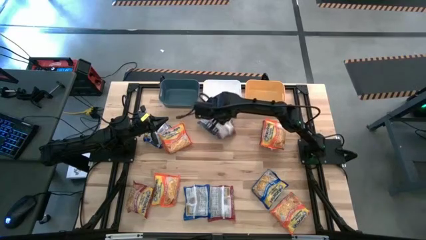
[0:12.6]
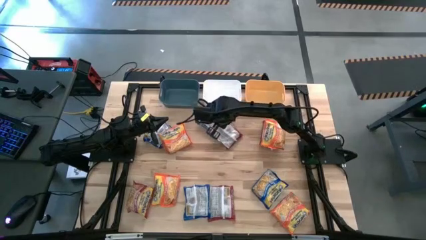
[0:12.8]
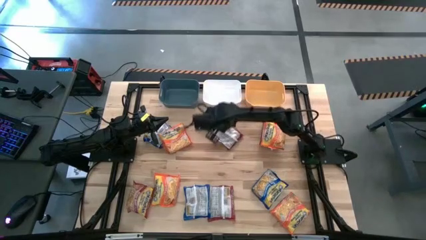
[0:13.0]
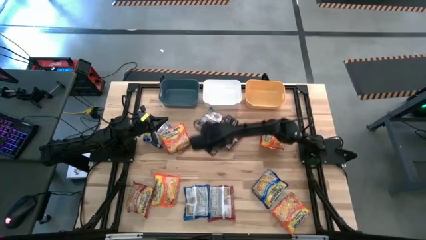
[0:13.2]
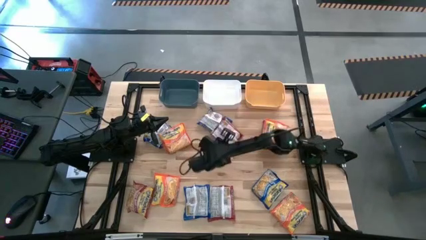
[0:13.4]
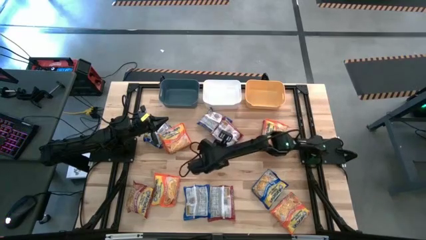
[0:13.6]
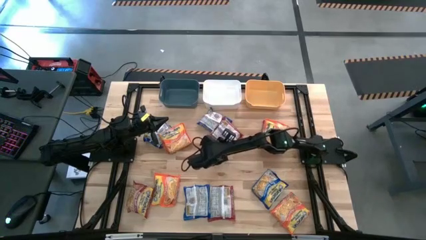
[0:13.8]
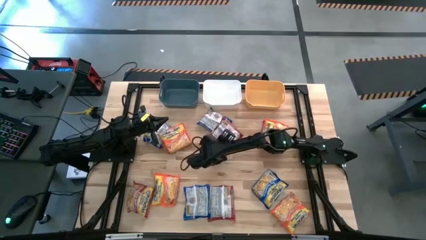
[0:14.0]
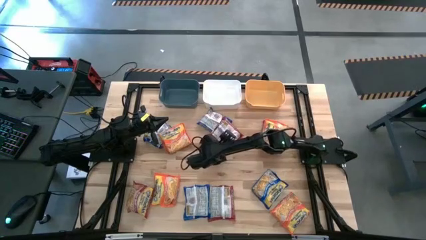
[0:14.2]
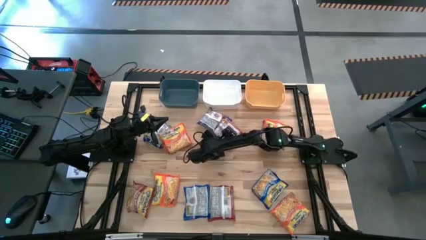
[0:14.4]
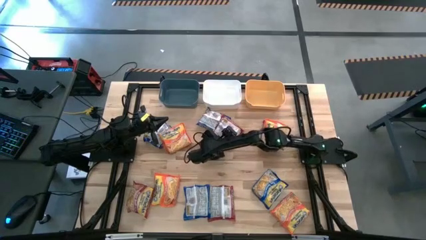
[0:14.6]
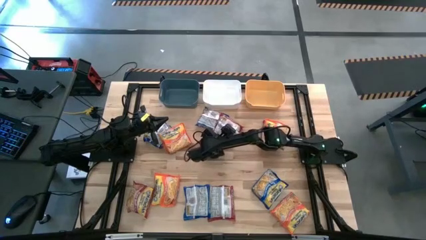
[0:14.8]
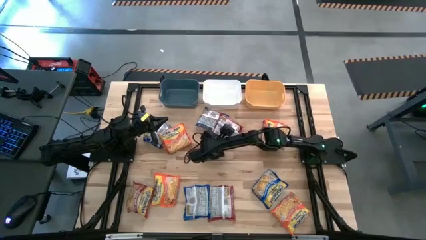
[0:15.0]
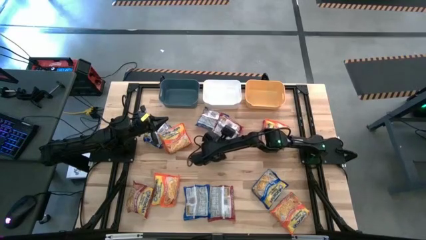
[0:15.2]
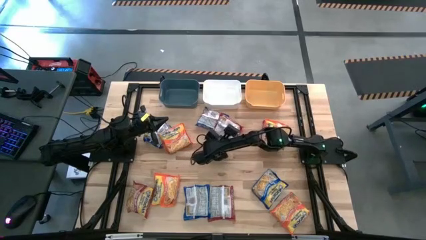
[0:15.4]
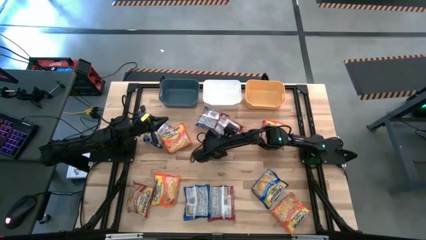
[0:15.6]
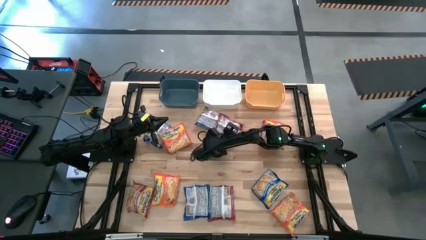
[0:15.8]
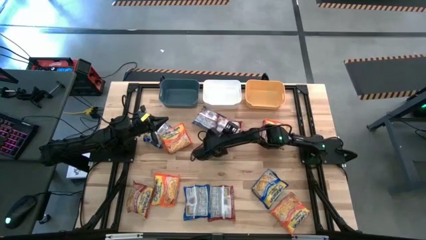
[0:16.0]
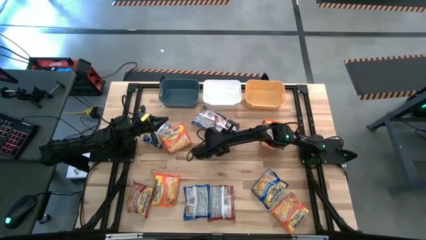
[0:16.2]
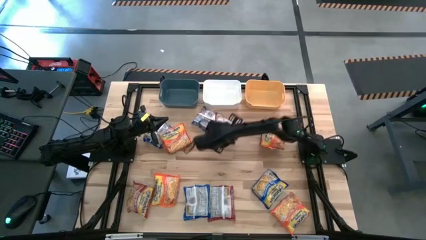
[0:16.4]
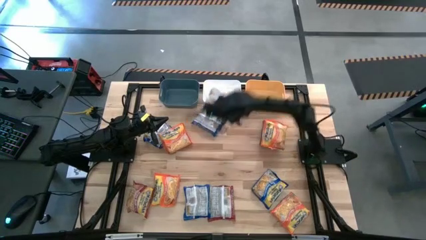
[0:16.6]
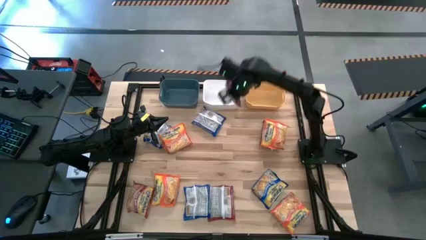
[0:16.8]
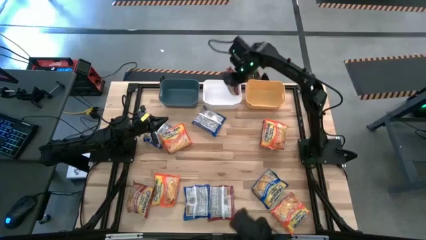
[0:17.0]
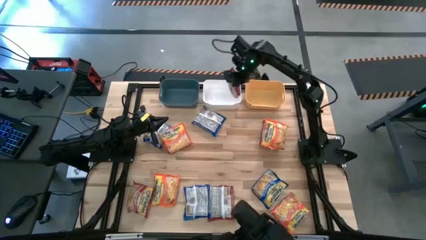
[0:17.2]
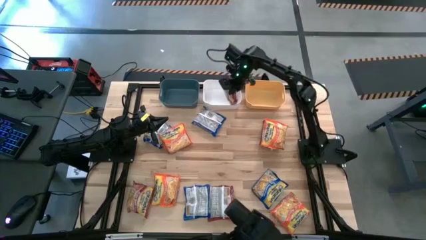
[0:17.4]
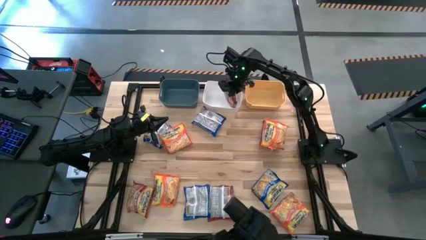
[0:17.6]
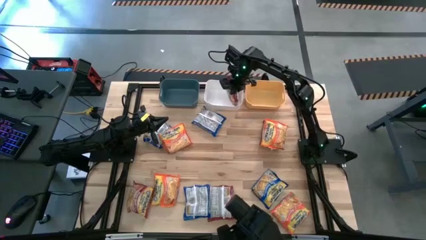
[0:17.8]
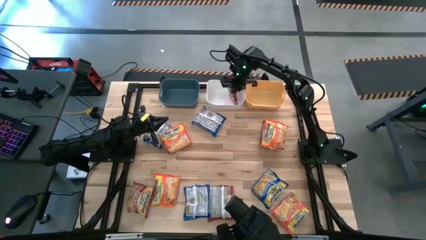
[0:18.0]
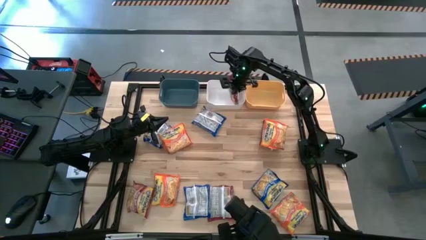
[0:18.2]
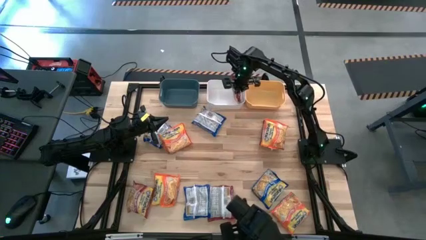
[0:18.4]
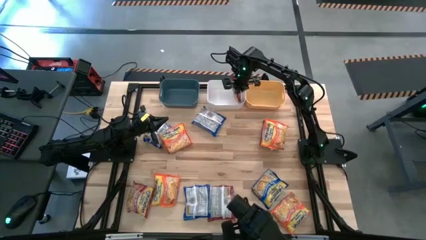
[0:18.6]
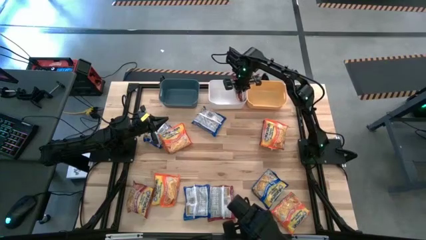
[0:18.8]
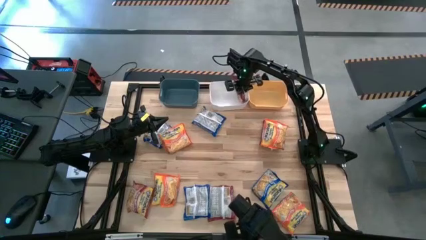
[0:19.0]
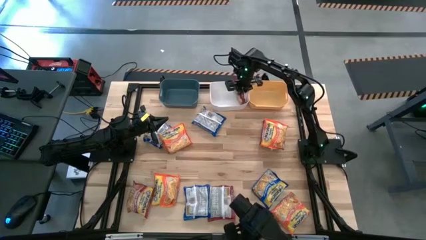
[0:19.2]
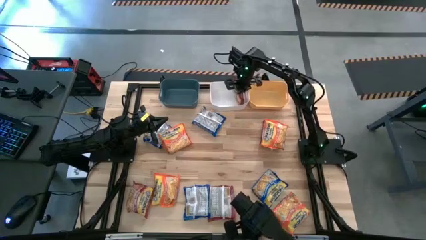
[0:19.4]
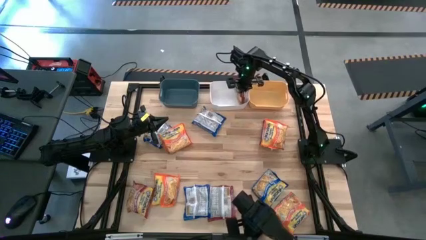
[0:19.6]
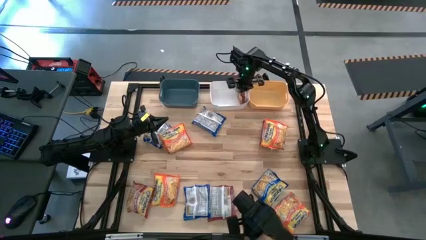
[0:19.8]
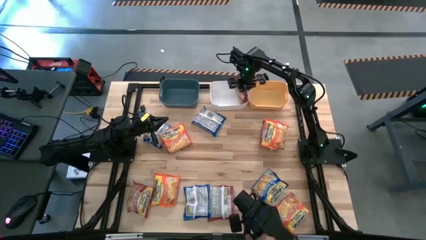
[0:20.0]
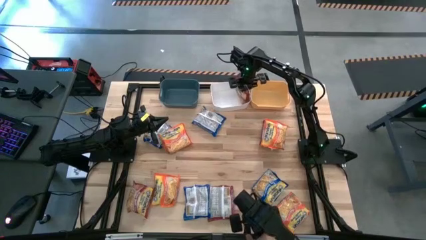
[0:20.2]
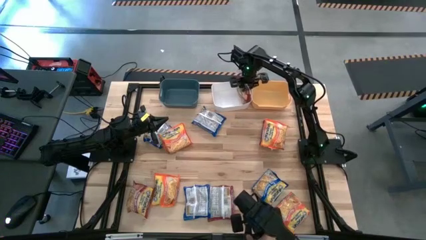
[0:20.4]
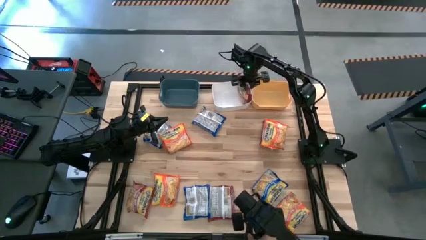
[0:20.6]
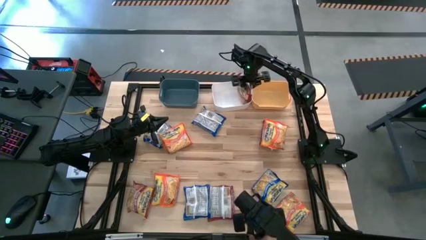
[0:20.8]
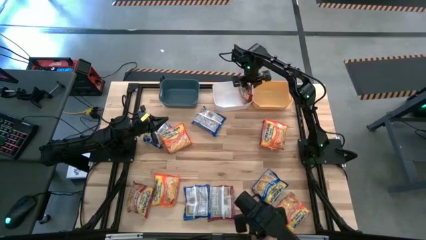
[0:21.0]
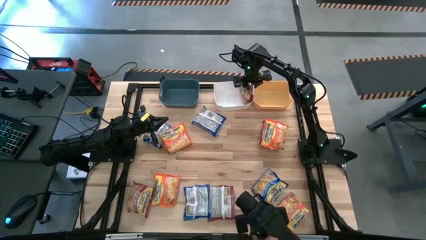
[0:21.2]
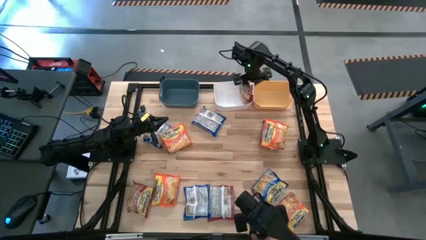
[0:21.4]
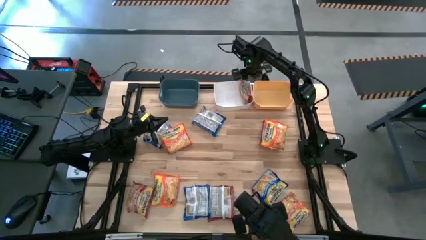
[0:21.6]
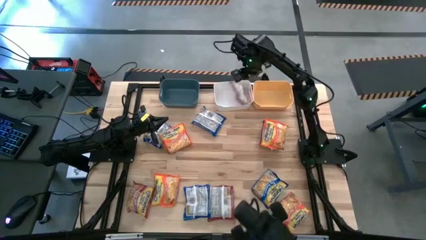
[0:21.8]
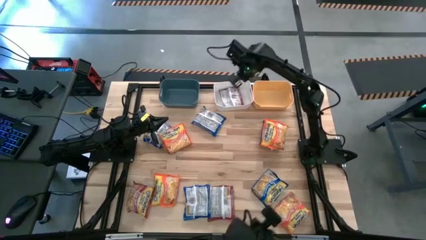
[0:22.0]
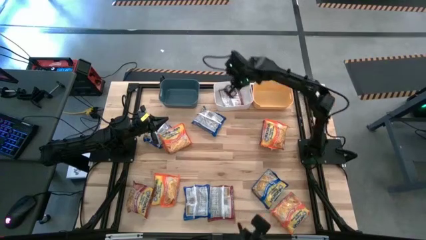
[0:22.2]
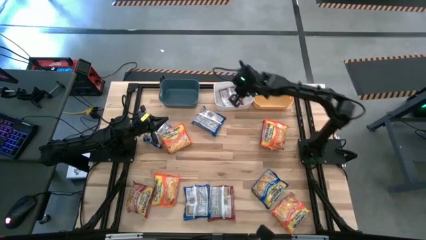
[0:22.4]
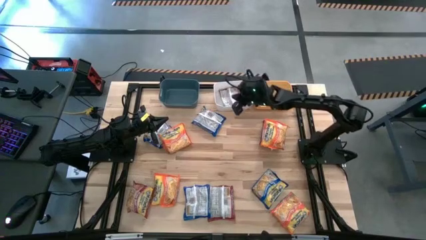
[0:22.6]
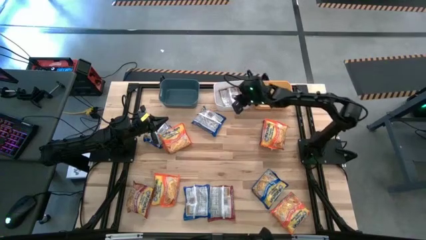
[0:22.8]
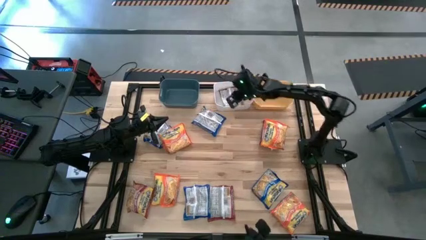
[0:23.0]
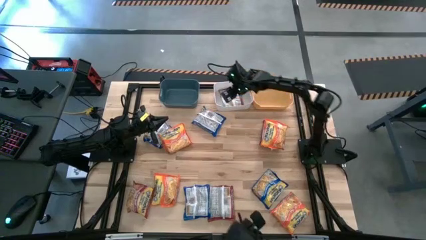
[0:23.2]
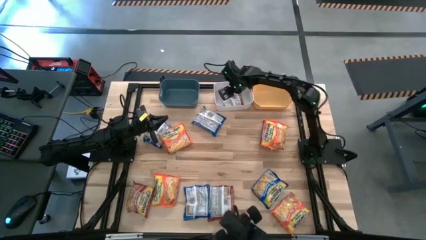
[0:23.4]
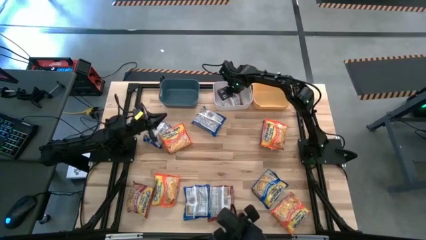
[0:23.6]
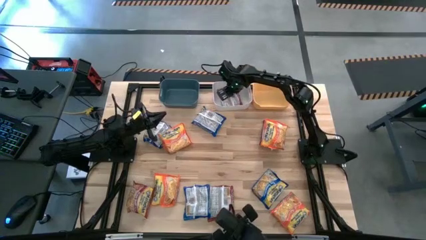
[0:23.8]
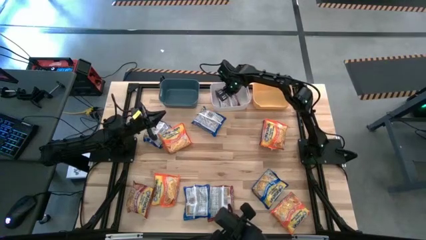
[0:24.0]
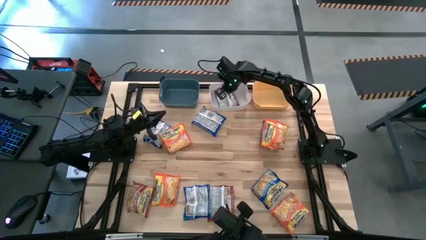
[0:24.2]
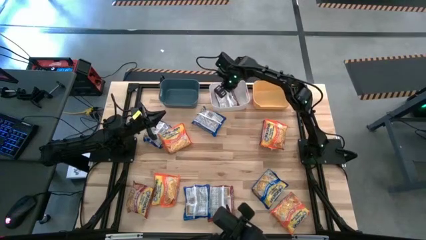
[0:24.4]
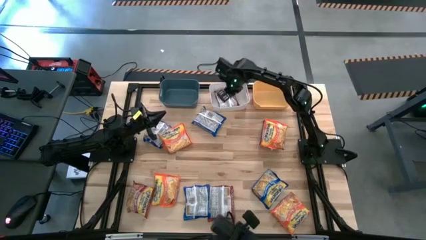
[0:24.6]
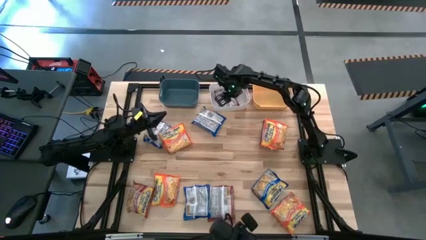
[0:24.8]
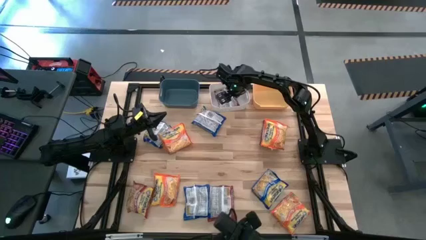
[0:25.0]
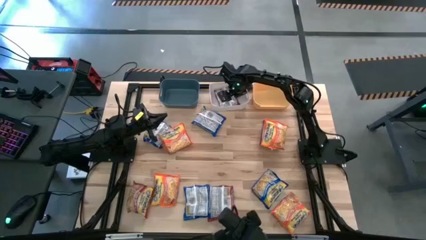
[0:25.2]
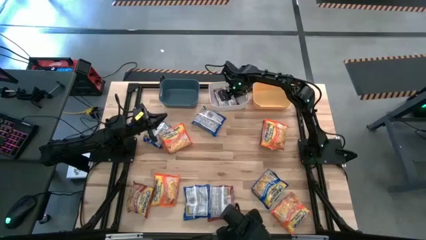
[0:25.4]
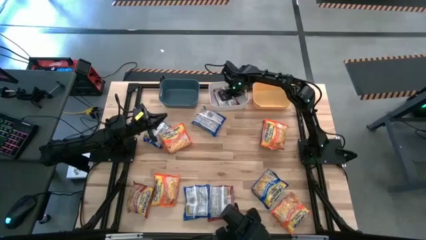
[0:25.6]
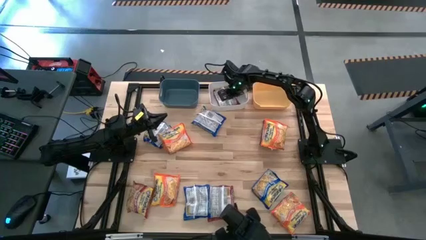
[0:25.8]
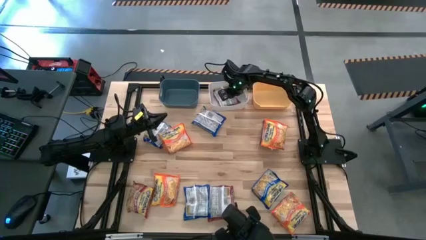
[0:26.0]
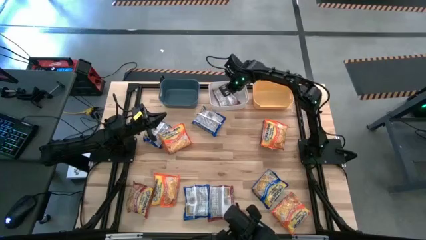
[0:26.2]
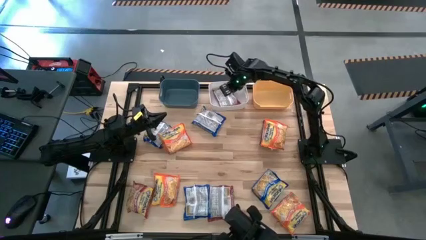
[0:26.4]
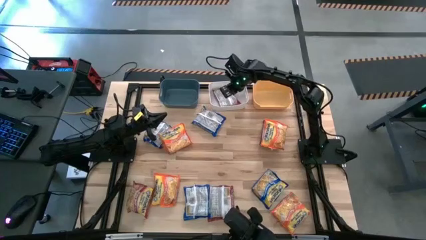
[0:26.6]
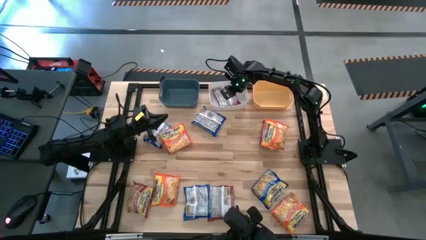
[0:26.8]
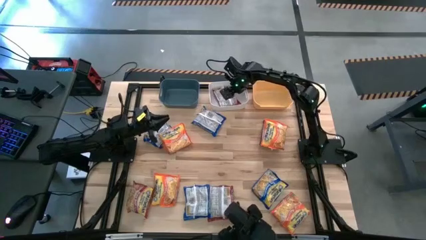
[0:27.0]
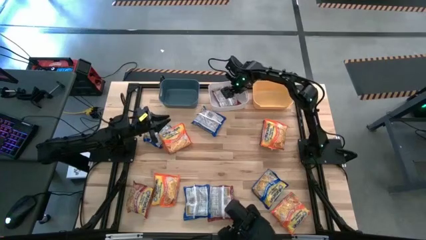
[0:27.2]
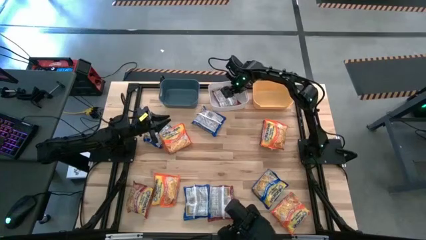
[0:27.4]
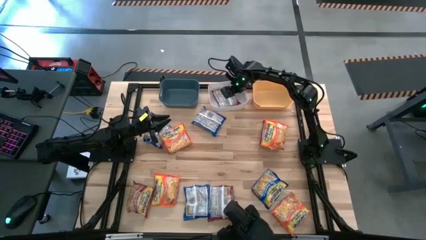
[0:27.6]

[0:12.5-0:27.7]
Task: Sort Maruchan noodles
Put the top middle red noodle pack into the white bin
